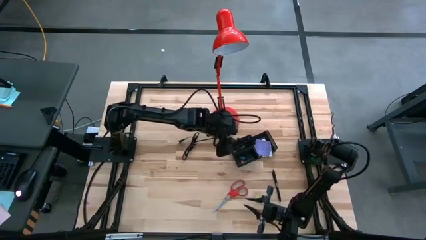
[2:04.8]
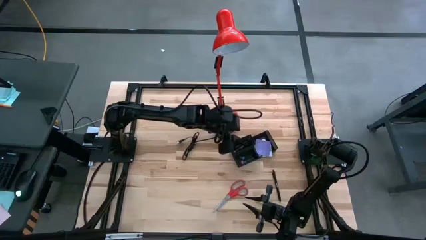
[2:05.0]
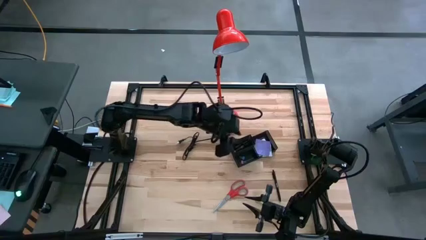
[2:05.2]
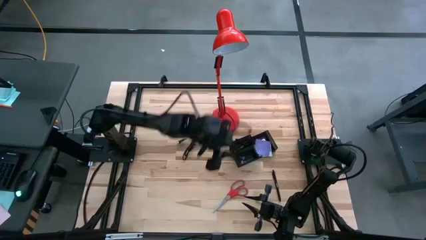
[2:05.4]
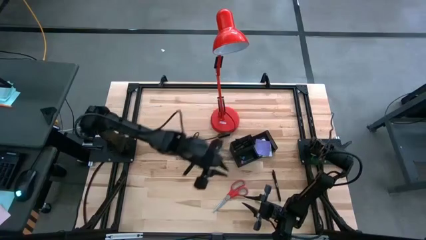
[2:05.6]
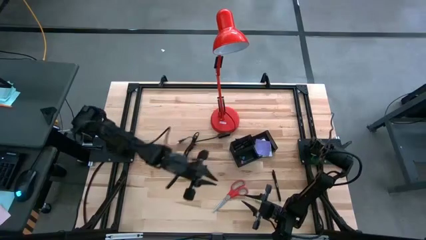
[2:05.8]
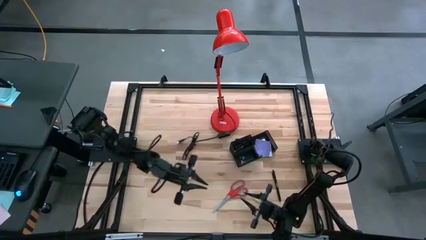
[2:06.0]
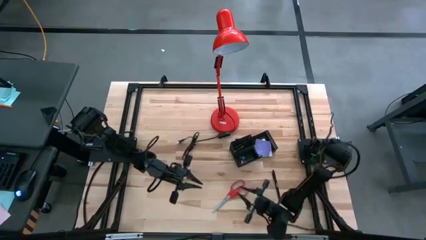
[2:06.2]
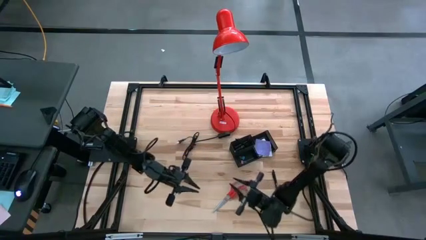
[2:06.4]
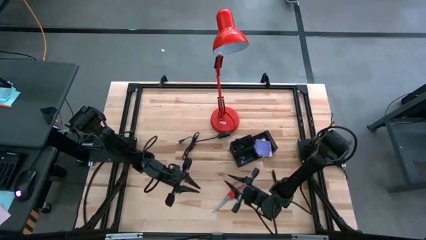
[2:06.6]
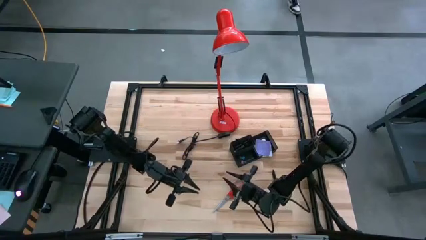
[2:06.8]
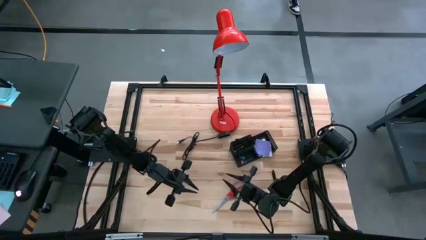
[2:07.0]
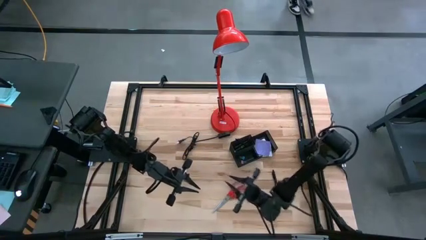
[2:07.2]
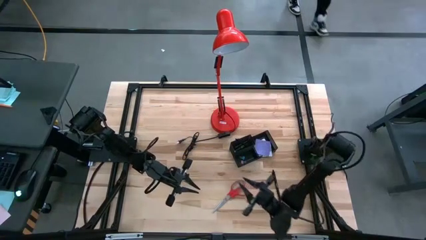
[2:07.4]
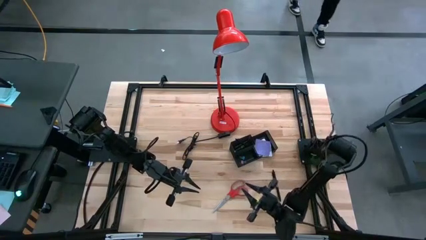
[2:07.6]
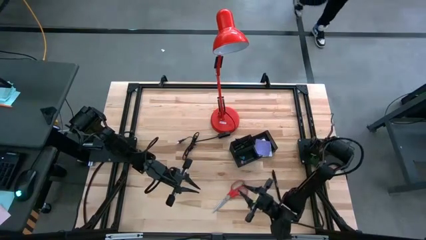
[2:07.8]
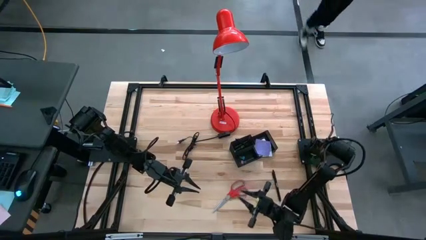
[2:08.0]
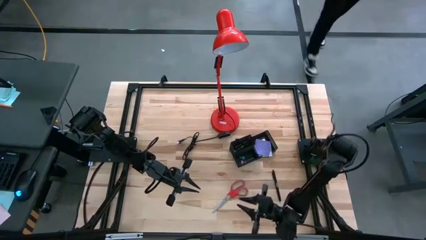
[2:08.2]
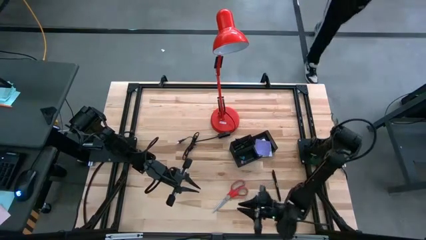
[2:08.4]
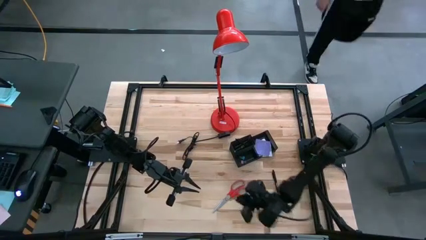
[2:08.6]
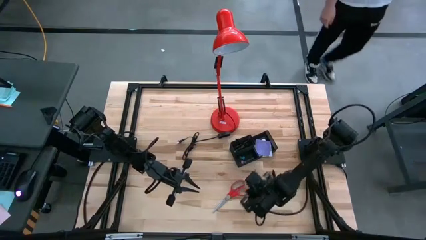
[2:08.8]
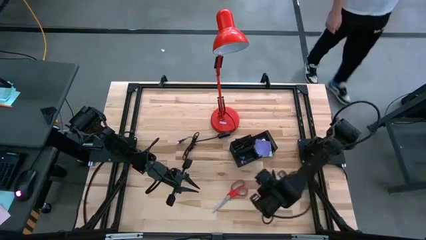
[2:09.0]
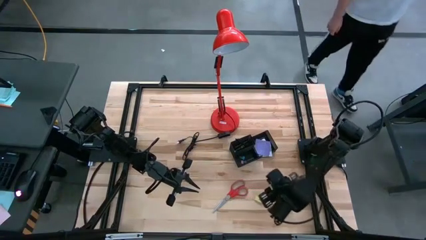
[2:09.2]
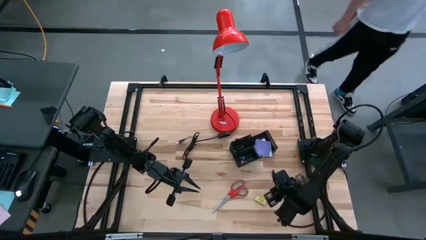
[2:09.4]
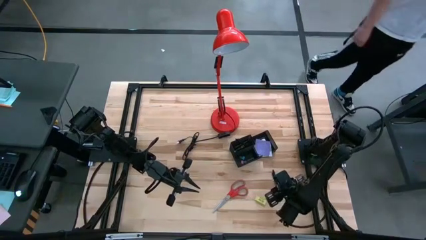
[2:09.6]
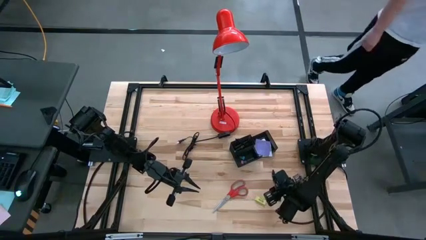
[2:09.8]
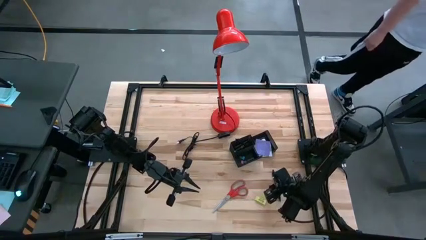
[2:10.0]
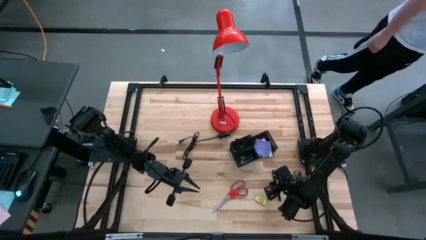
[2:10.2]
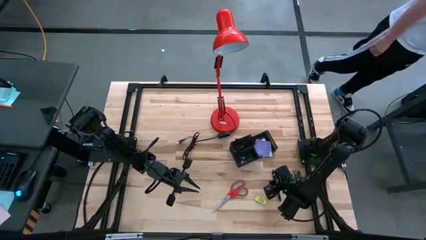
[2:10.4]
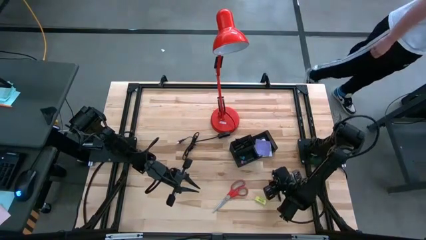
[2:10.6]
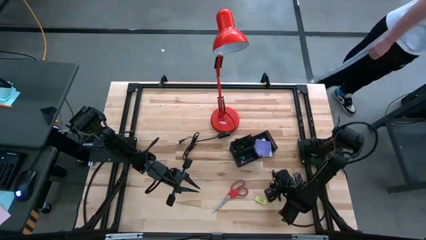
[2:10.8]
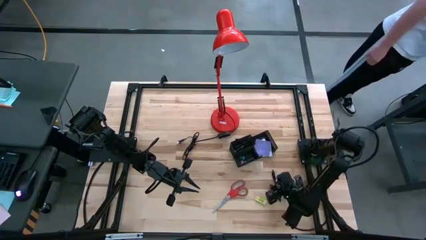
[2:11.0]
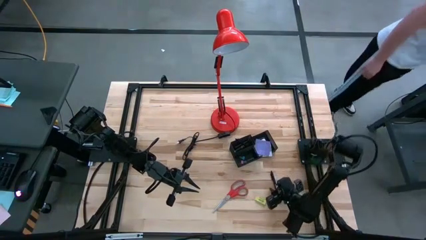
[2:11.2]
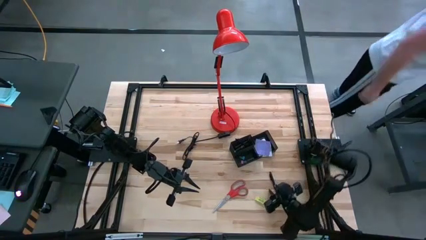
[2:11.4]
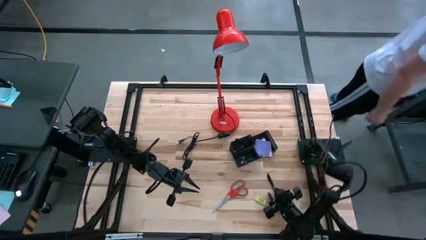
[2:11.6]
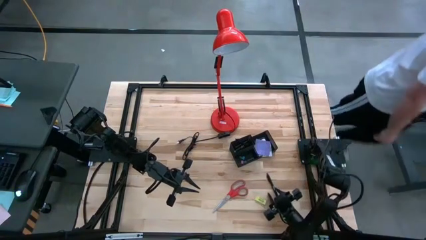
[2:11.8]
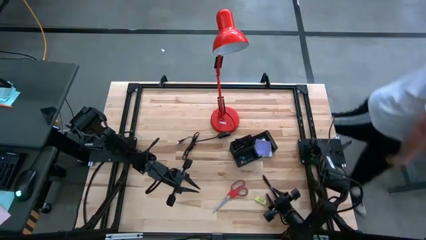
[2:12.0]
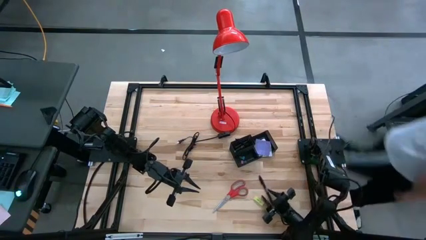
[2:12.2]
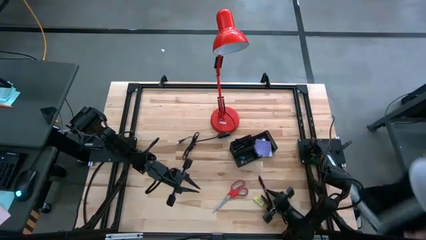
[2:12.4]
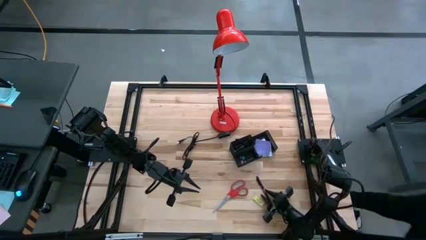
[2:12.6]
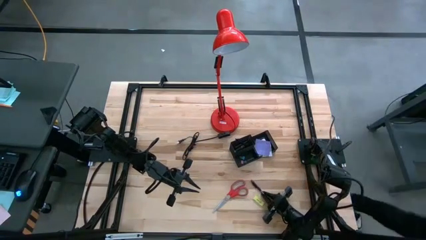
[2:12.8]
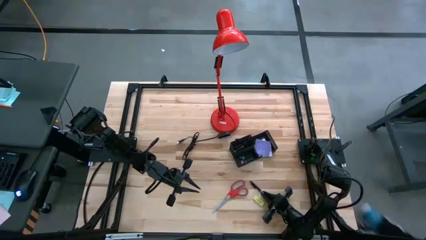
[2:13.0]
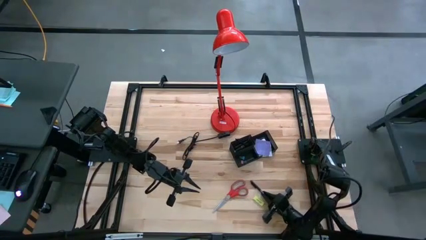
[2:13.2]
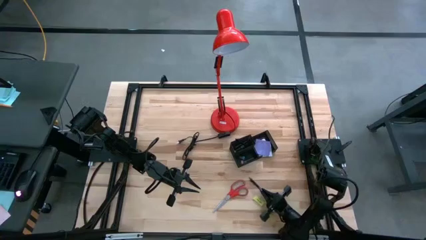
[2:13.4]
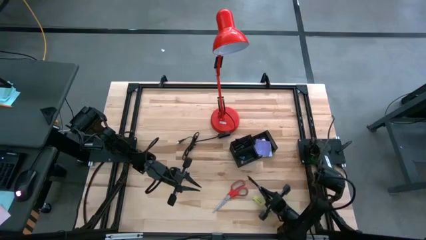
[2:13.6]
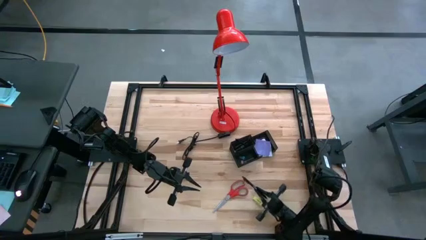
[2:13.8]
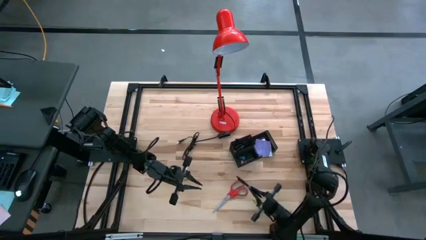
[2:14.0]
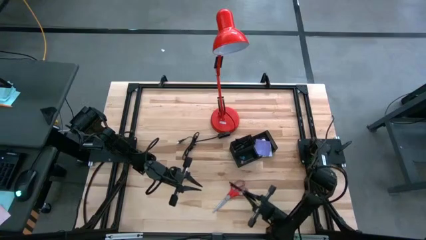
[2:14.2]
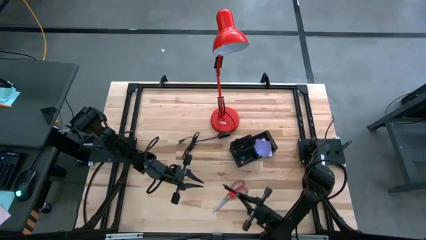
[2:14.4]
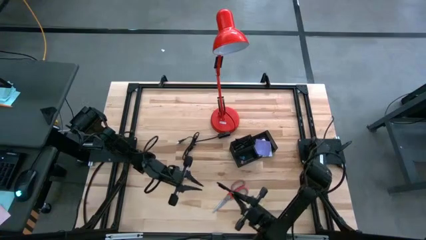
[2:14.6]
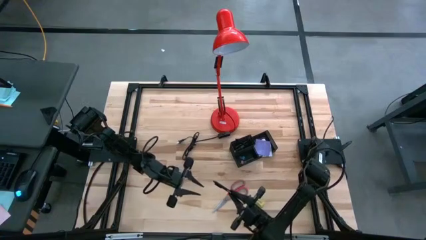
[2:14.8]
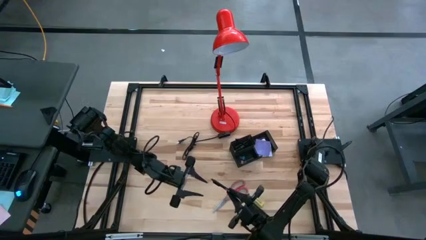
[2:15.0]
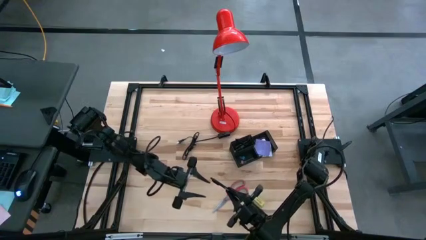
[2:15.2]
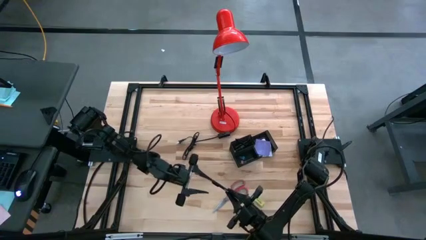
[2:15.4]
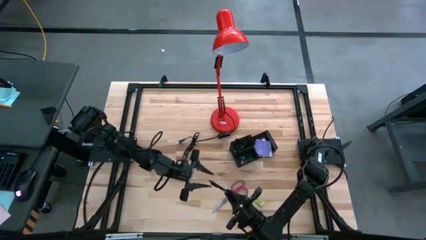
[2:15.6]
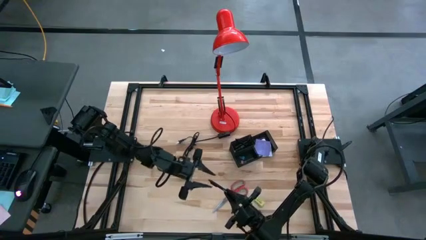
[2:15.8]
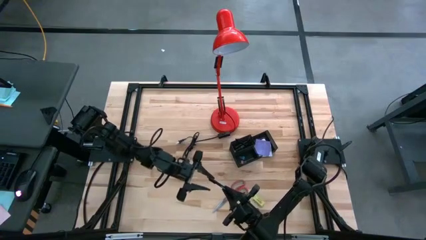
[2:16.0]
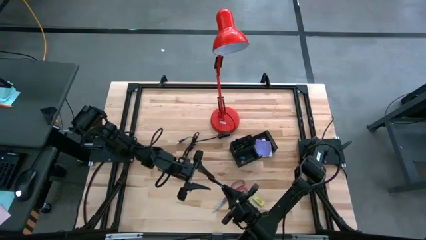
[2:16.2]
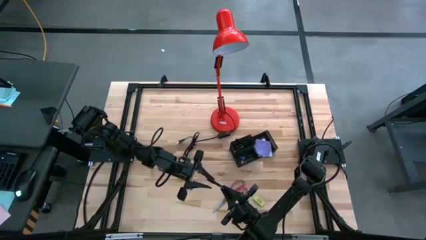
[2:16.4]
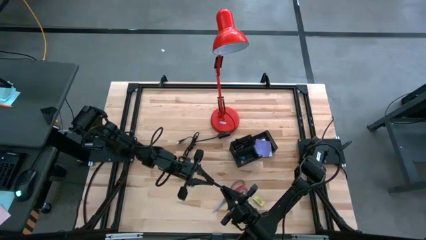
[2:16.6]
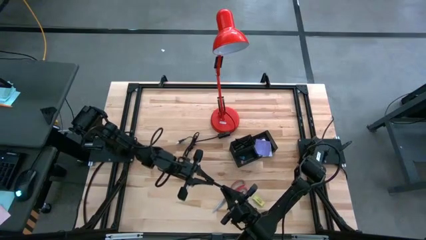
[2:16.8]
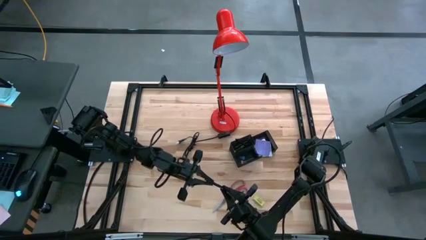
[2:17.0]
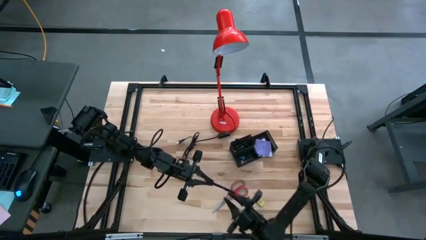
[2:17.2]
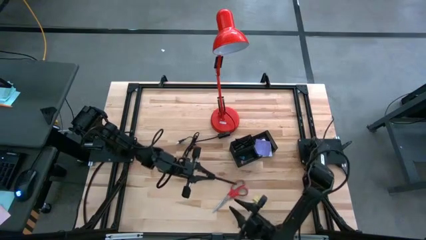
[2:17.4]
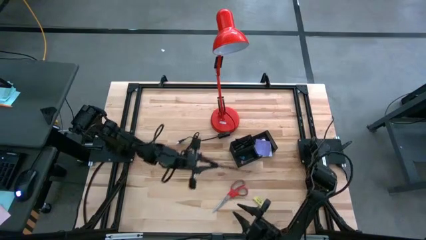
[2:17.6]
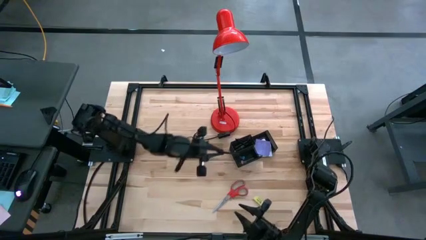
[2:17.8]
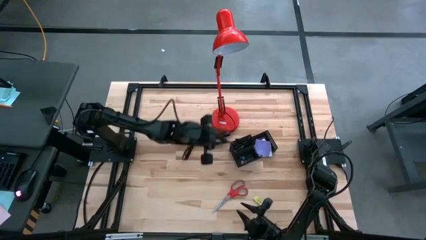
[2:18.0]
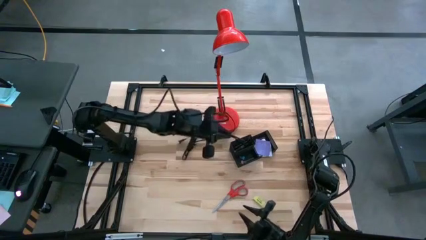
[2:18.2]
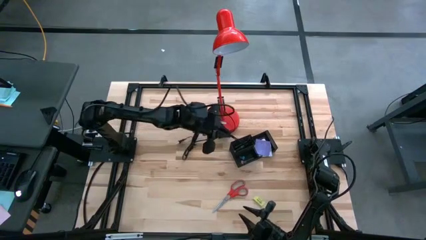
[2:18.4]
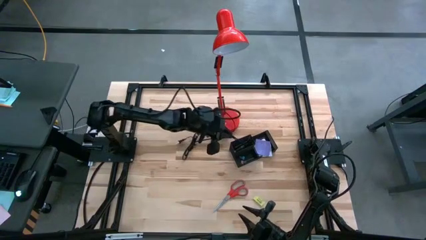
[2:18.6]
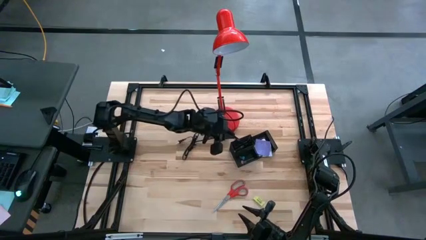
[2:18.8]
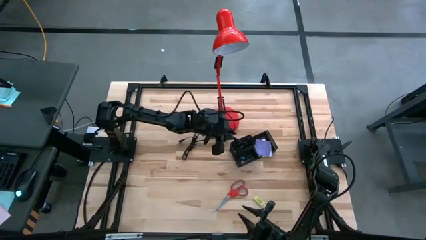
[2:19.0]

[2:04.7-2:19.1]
Task: Pick and place office supplies into organizer
Put the black pen into the desk organizer
